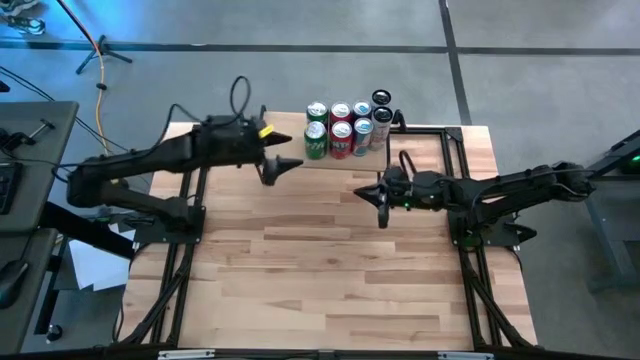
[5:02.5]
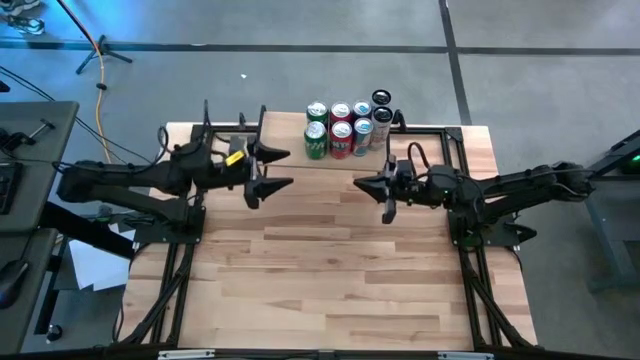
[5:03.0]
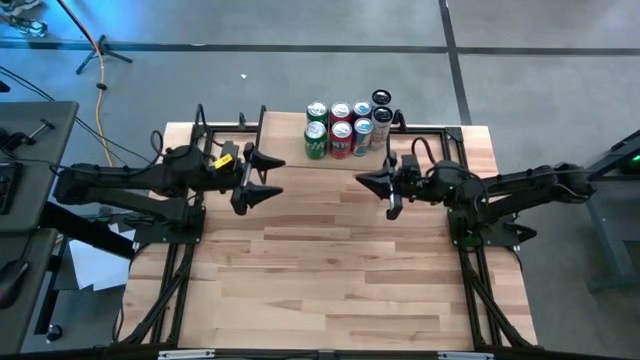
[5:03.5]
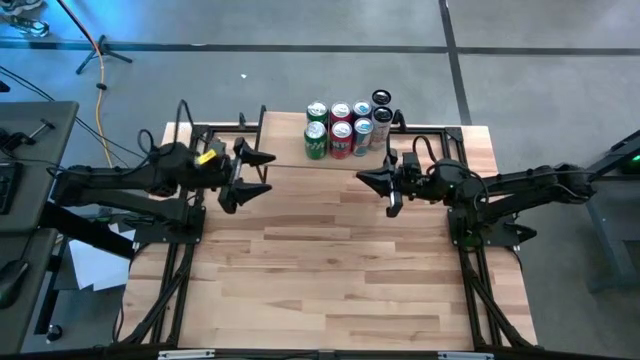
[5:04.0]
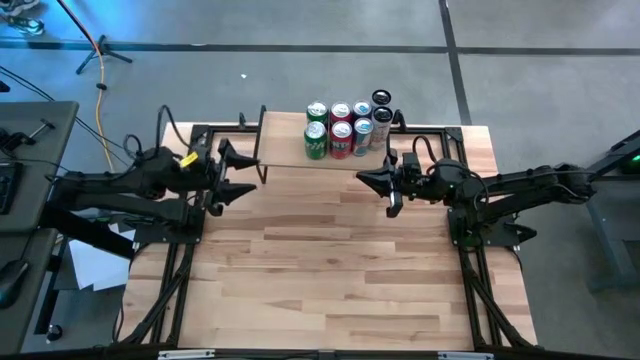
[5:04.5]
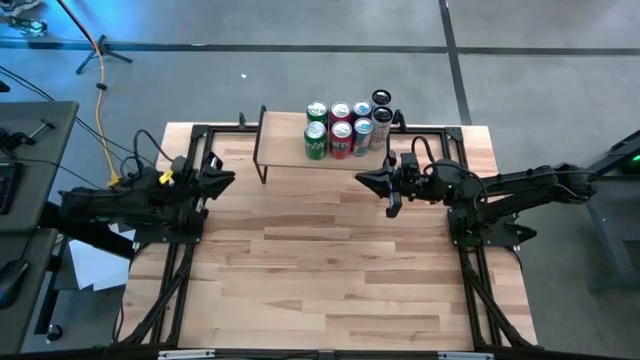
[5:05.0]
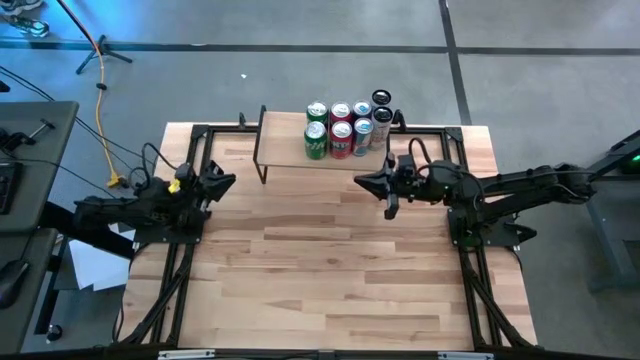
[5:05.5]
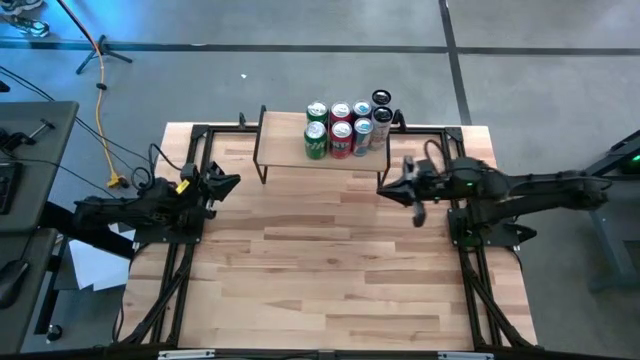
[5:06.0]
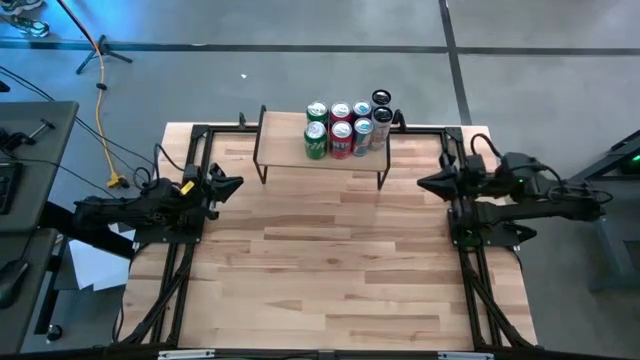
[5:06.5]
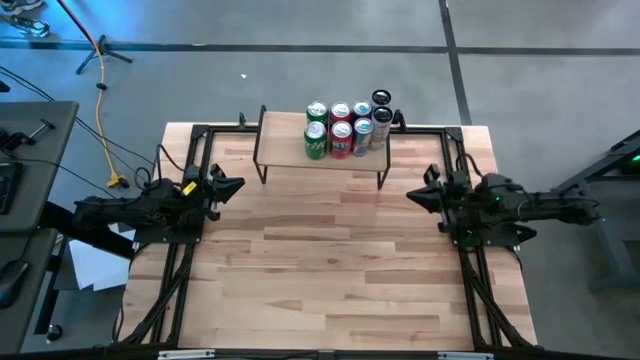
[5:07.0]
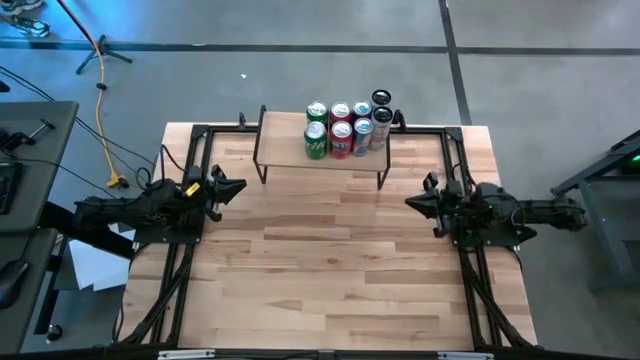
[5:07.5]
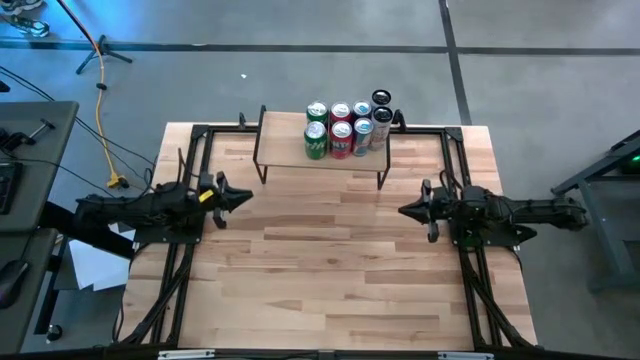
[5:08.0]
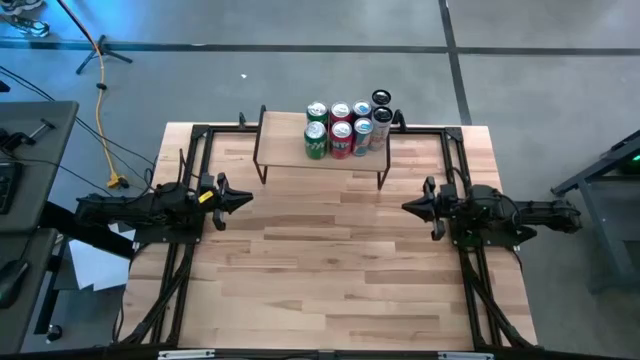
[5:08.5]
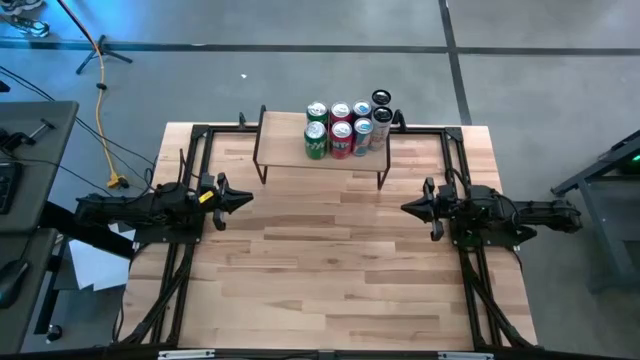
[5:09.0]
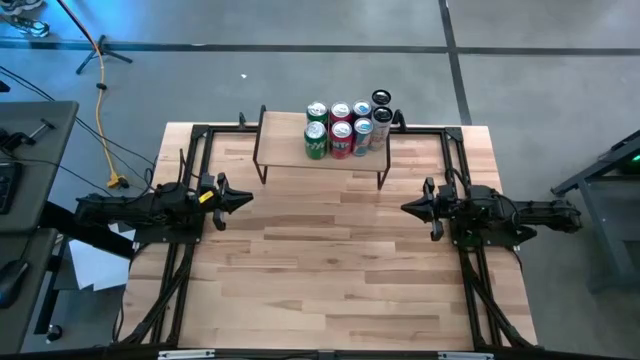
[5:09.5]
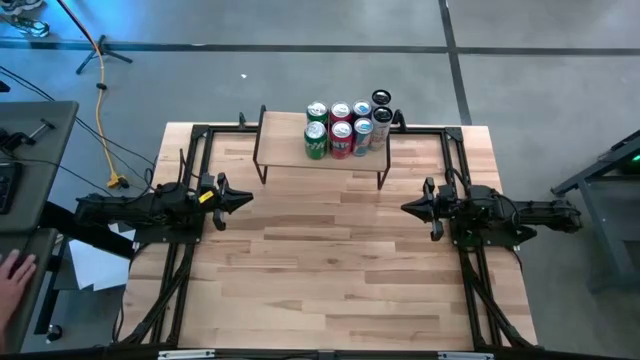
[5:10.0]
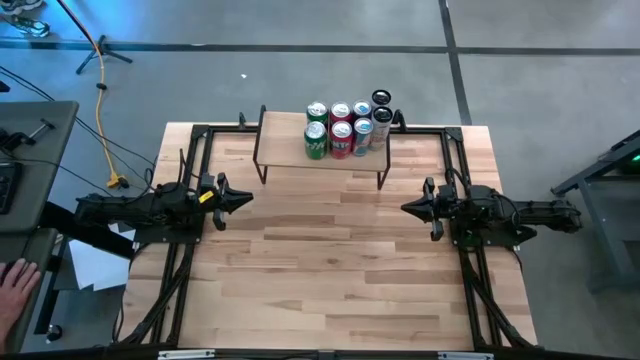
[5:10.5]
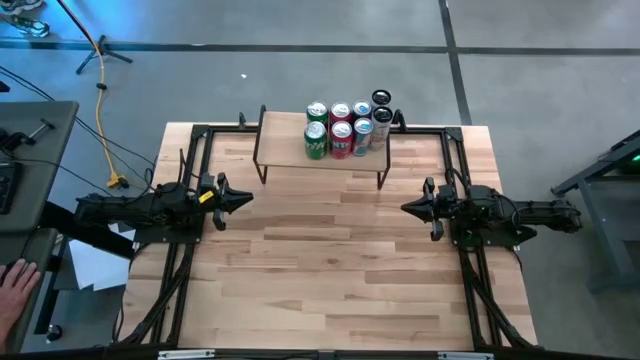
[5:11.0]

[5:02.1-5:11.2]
Task: Place canned beverage on shelf
Return to Home Position

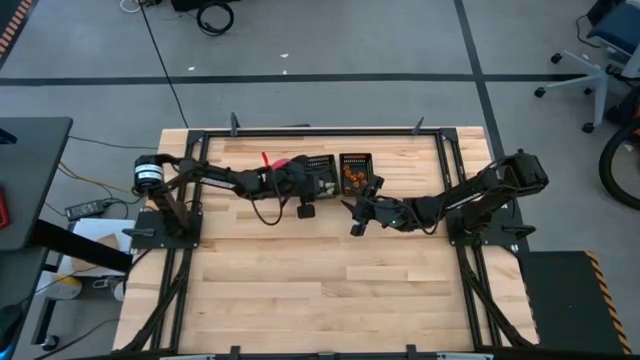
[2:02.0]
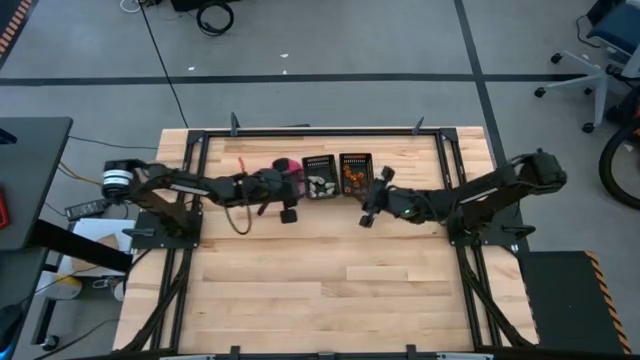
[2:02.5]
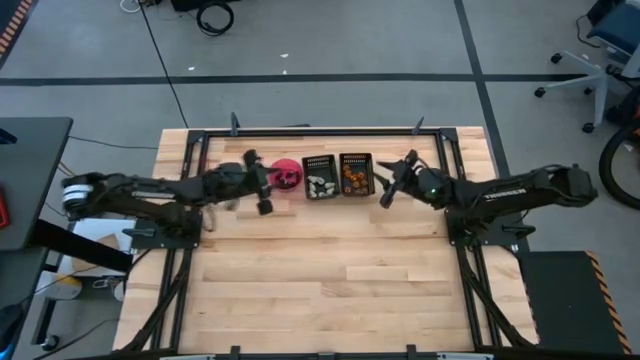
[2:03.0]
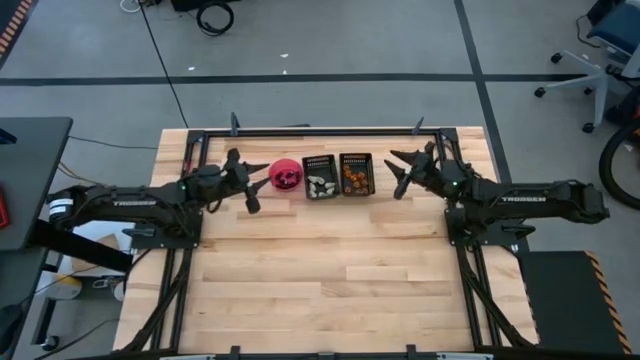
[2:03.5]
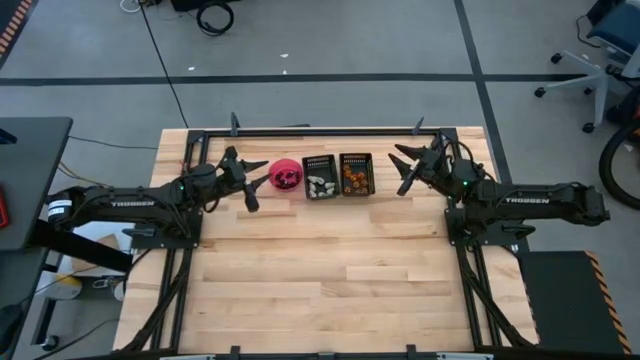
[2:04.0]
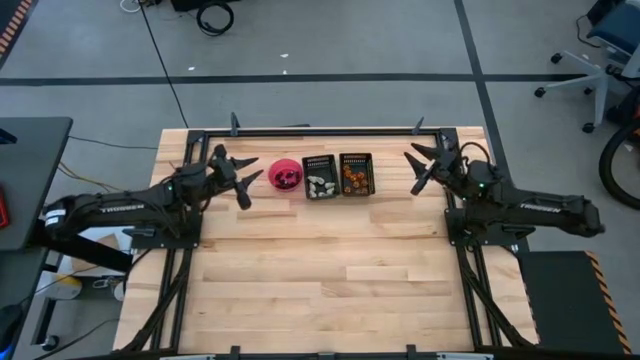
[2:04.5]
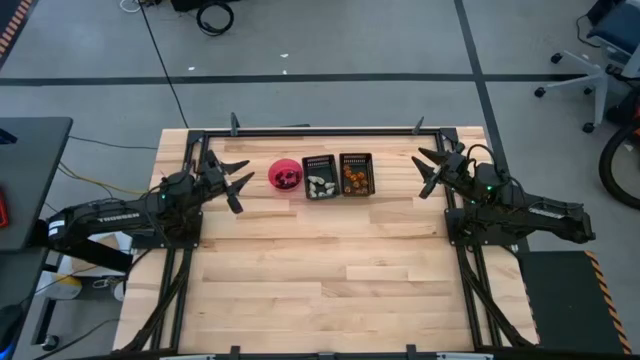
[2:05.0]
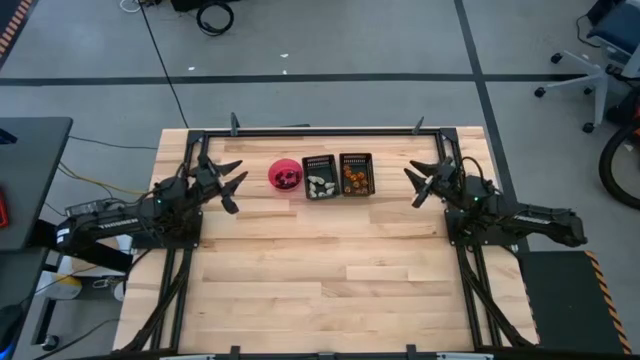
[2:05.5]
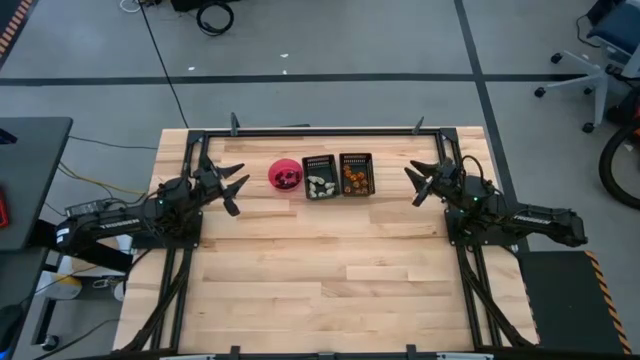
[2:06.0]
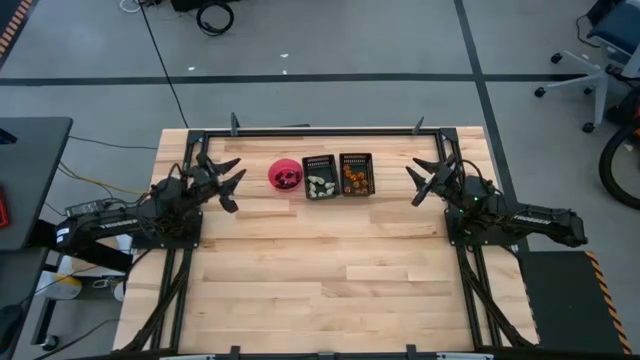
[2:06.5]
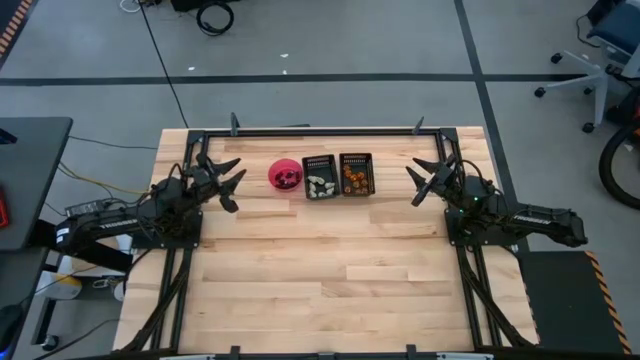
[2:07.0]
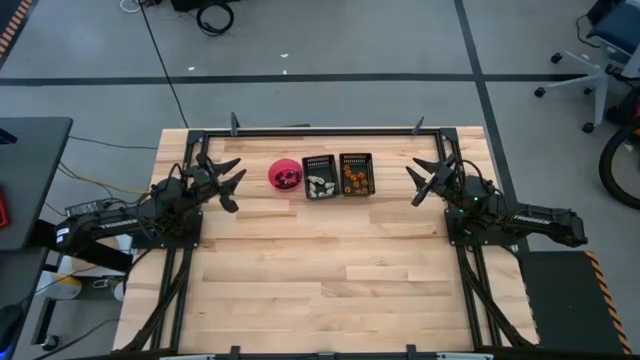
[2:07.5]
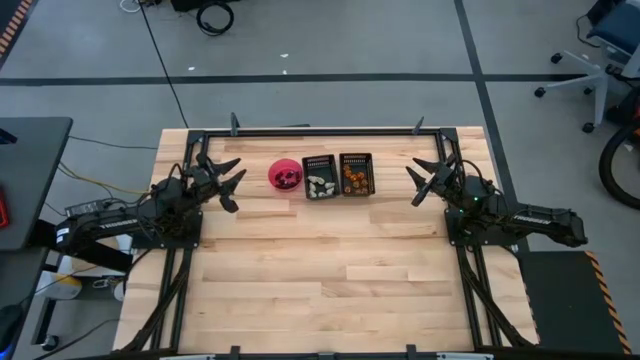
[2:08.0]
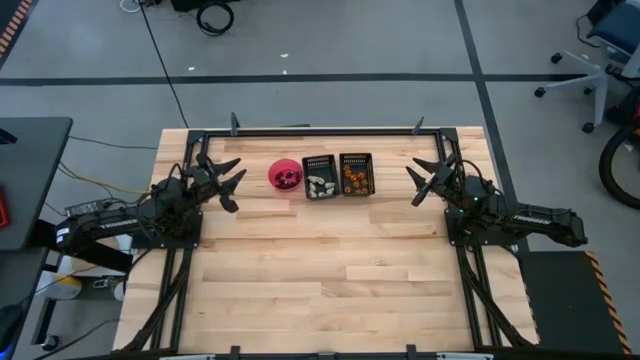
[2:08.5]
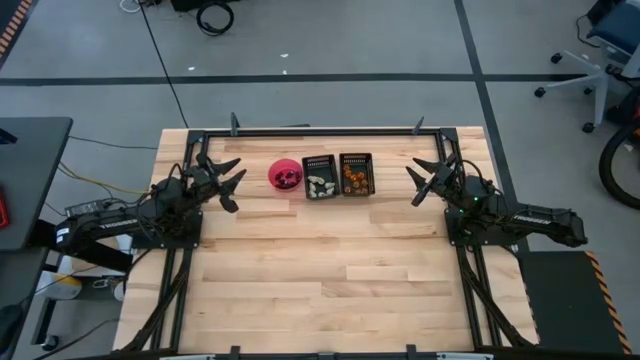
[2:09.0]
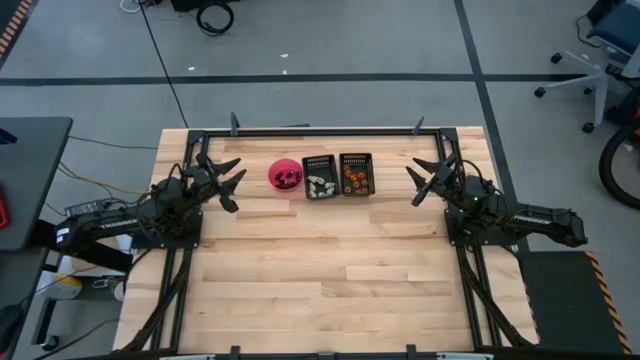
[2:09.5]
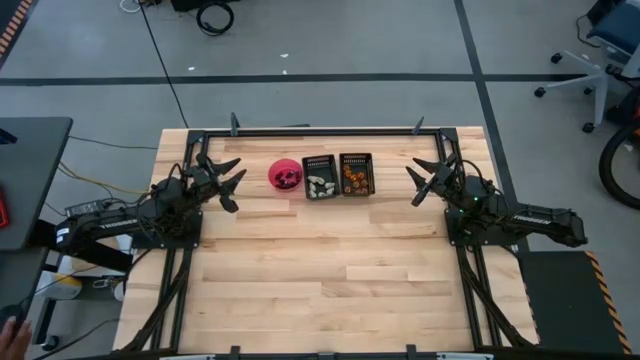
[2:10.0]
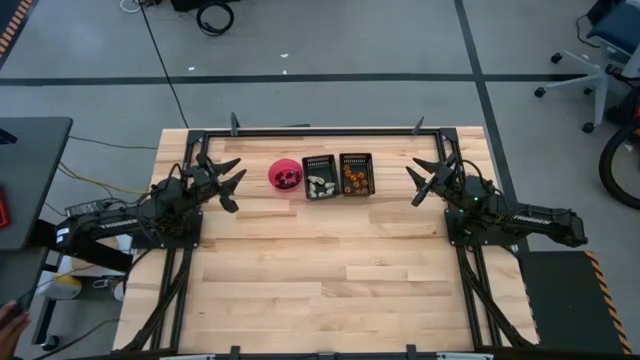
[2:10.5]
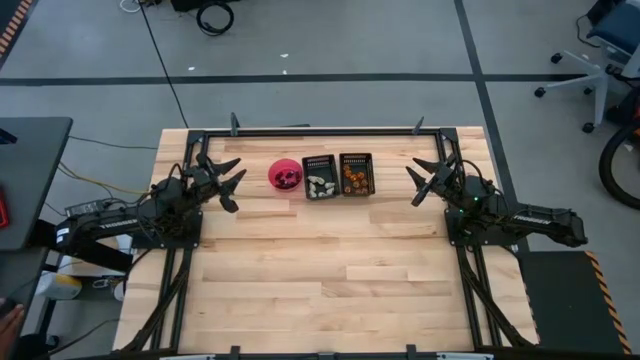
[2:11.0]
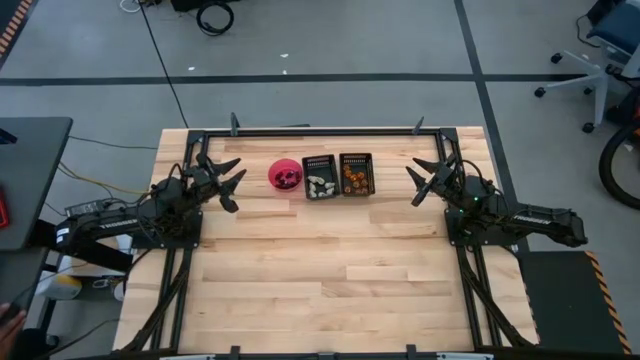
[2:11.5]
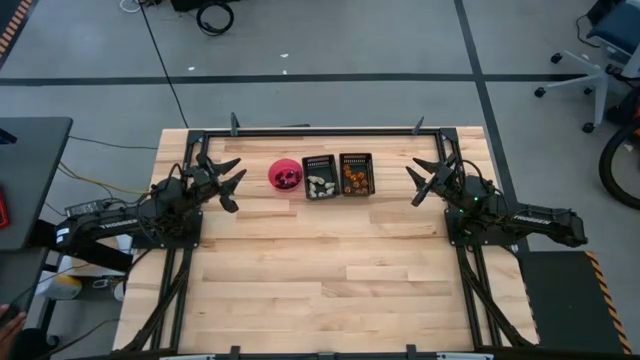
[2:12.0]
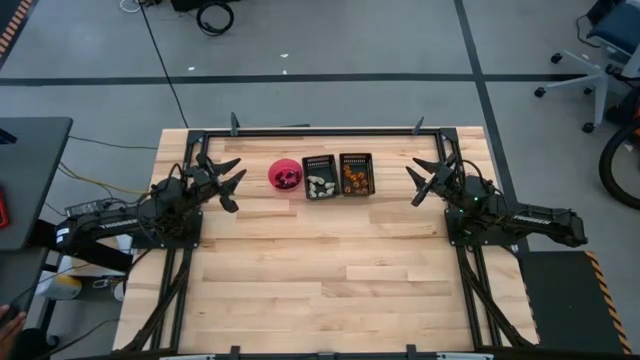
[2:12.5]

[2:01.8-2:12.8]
Task: Sort Halloween decoration
Return to Home Position
